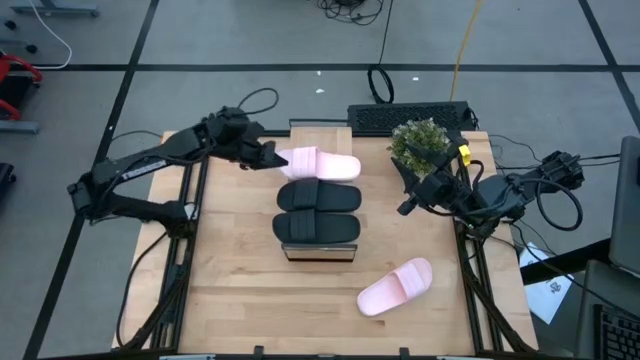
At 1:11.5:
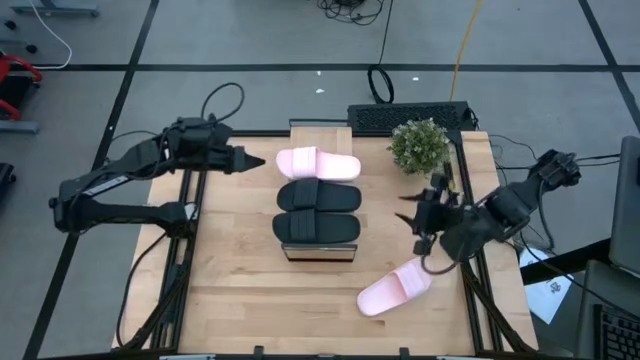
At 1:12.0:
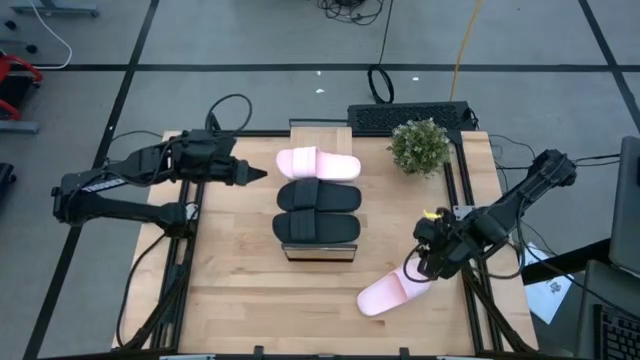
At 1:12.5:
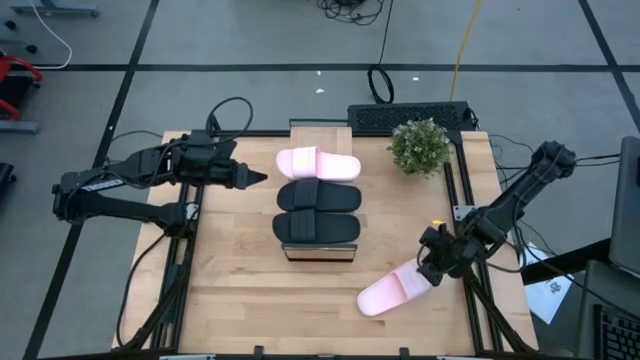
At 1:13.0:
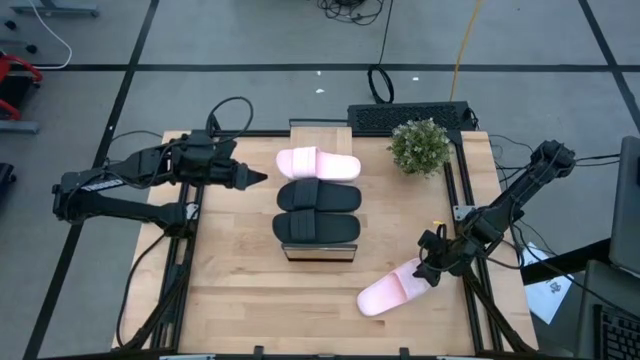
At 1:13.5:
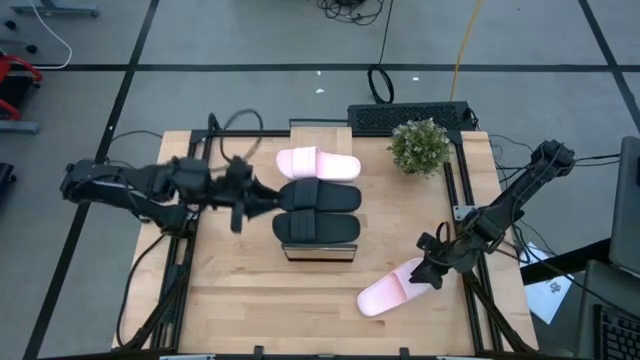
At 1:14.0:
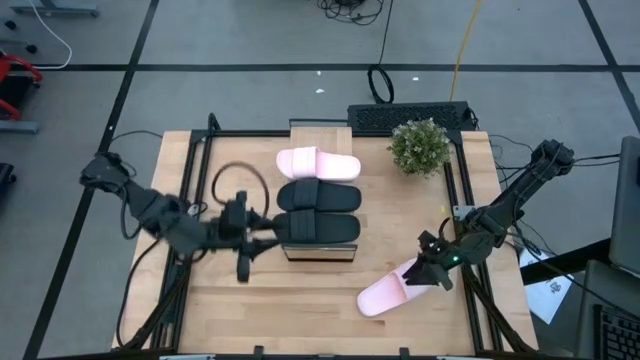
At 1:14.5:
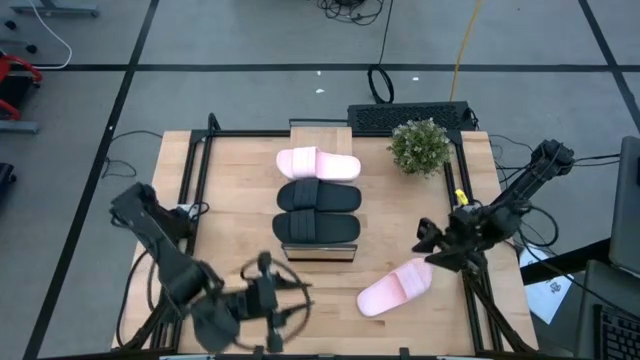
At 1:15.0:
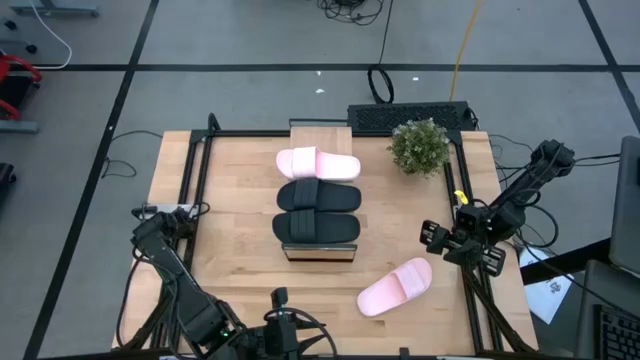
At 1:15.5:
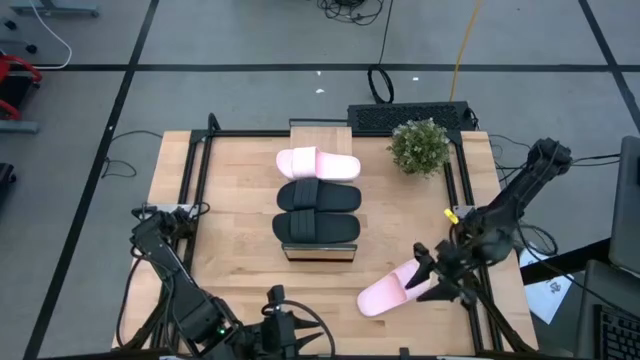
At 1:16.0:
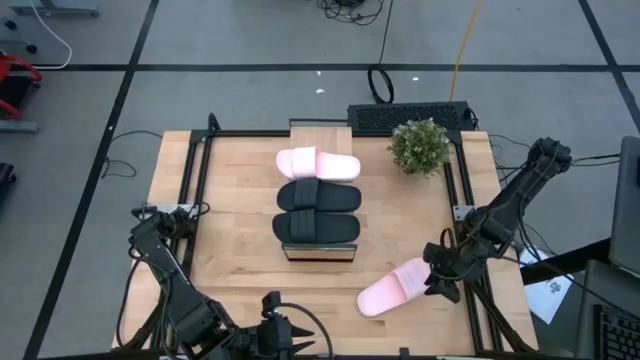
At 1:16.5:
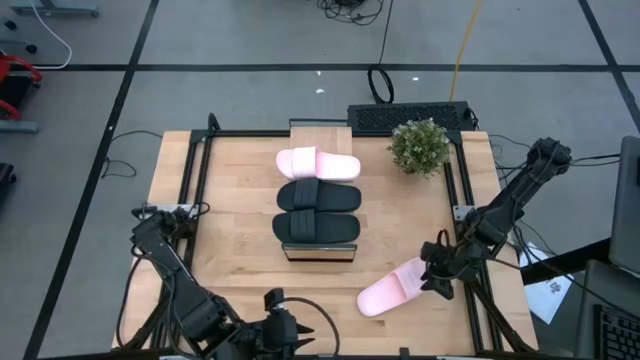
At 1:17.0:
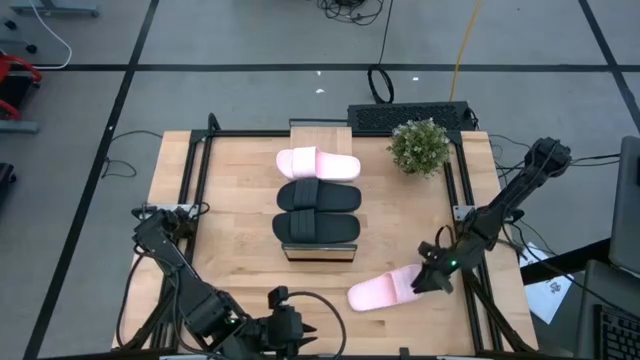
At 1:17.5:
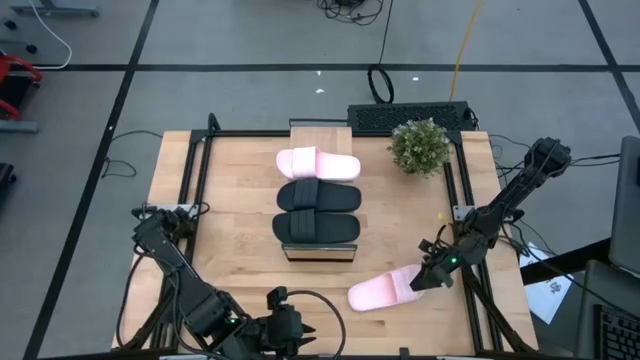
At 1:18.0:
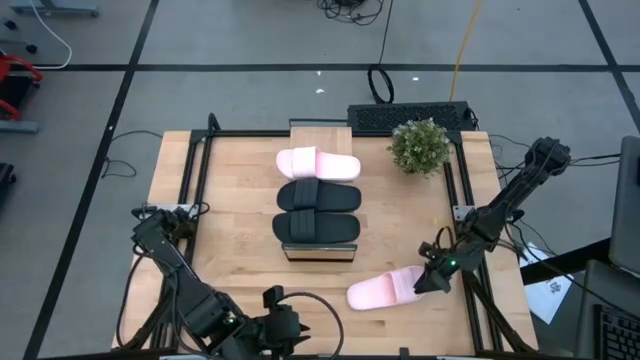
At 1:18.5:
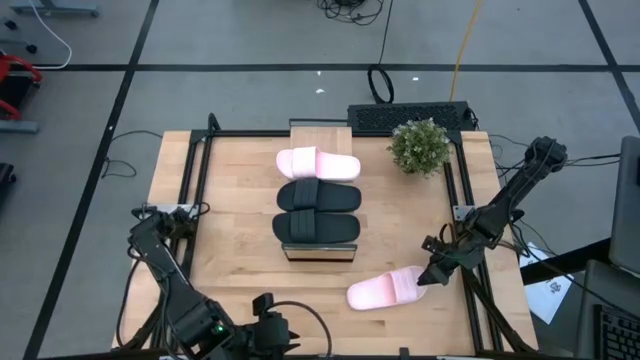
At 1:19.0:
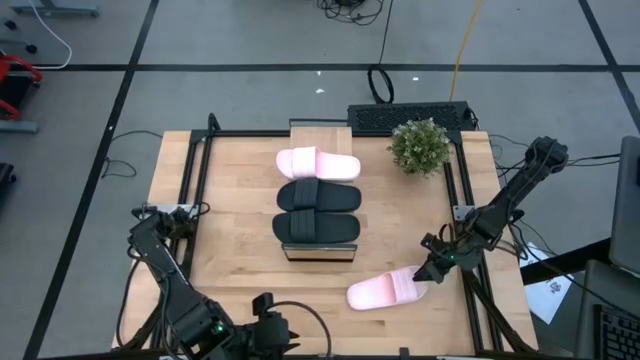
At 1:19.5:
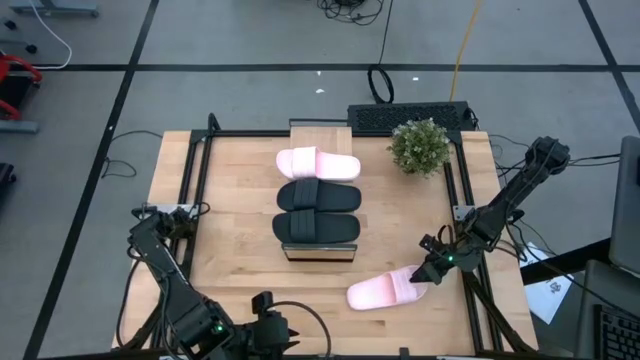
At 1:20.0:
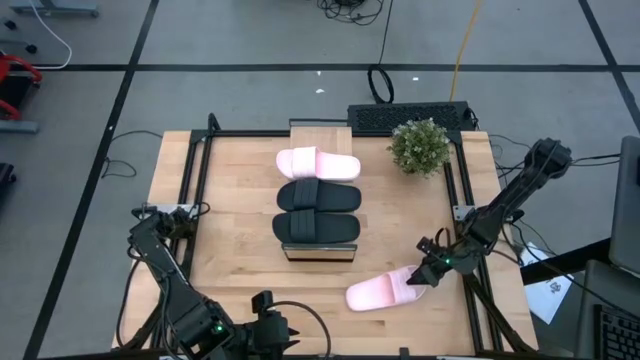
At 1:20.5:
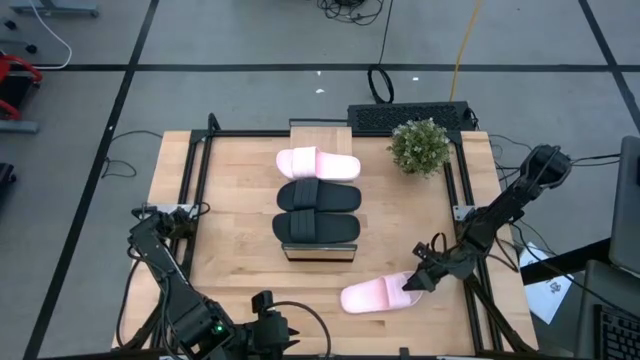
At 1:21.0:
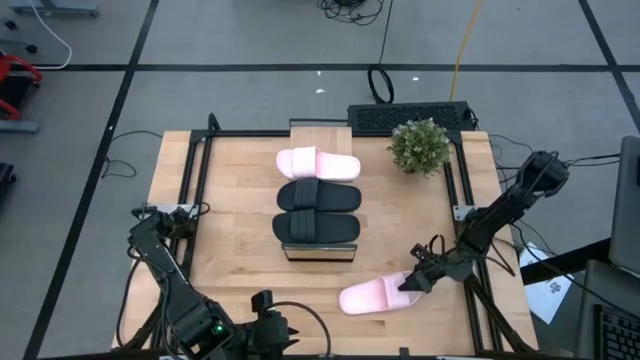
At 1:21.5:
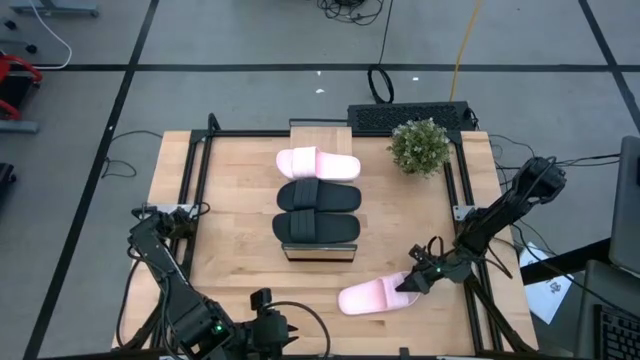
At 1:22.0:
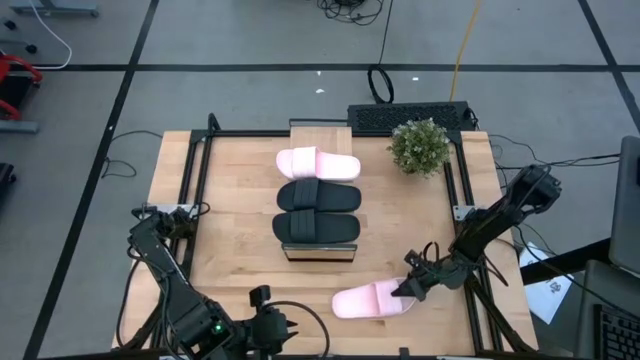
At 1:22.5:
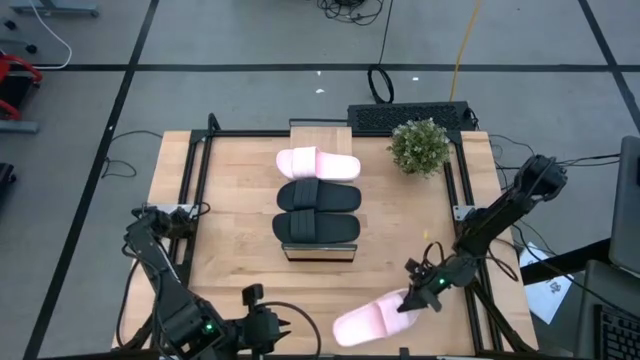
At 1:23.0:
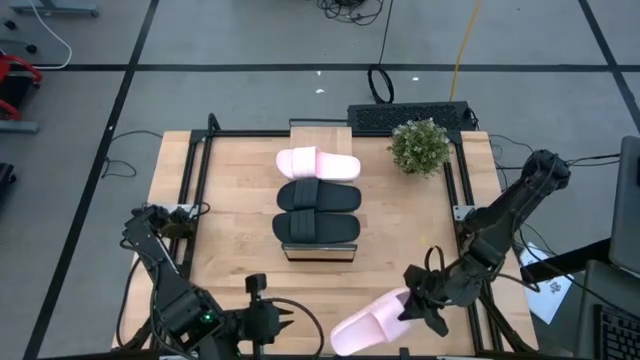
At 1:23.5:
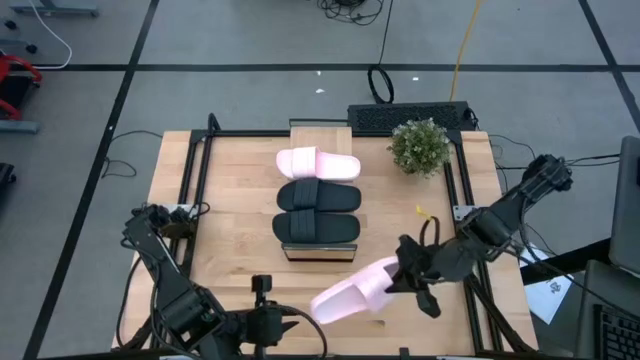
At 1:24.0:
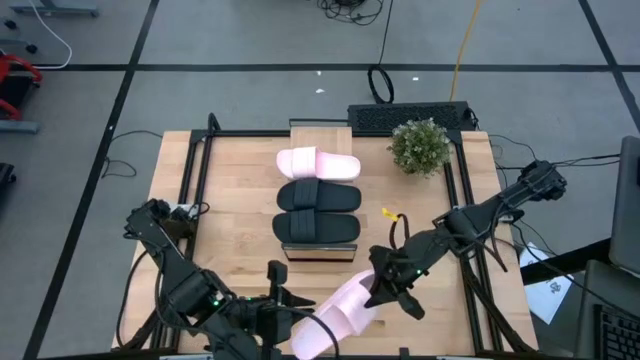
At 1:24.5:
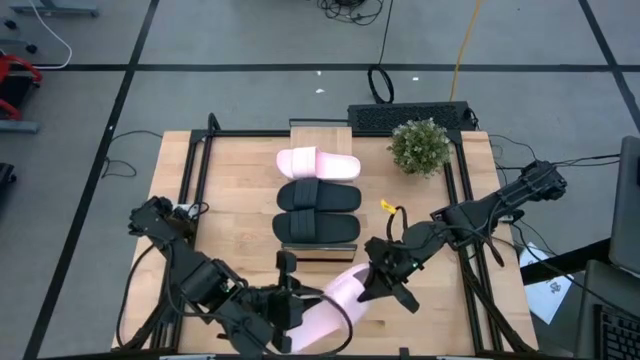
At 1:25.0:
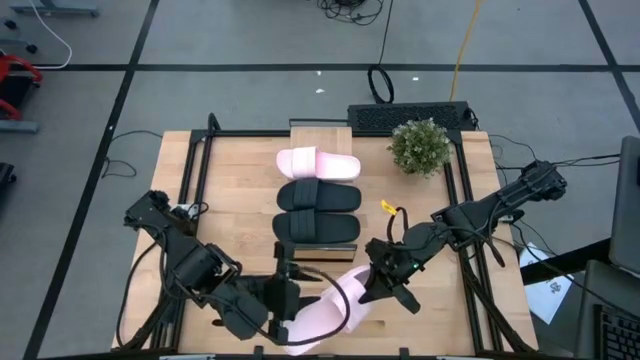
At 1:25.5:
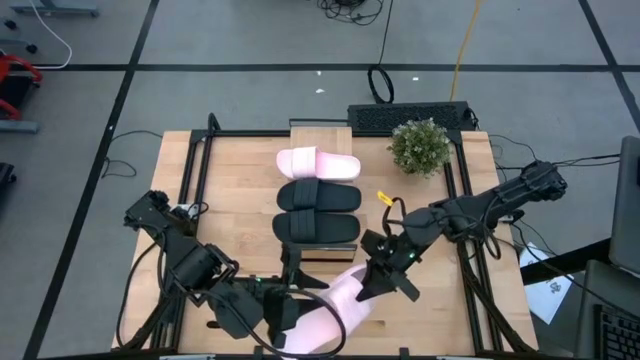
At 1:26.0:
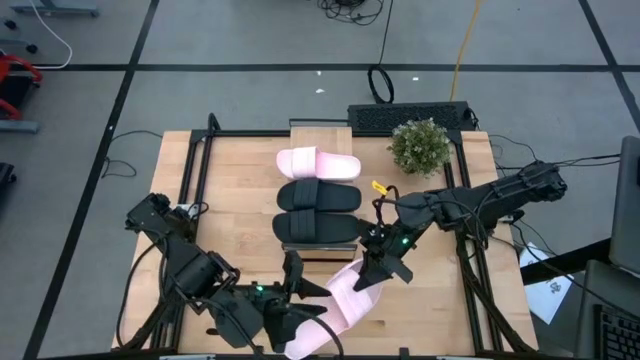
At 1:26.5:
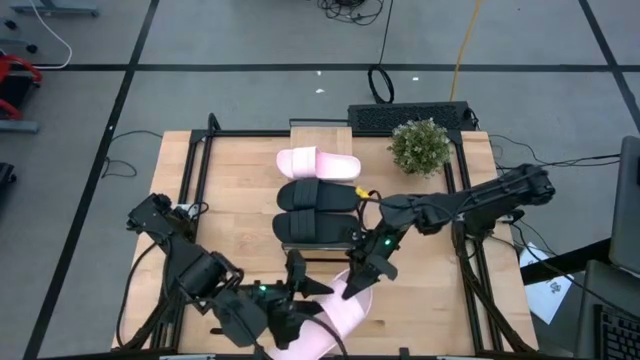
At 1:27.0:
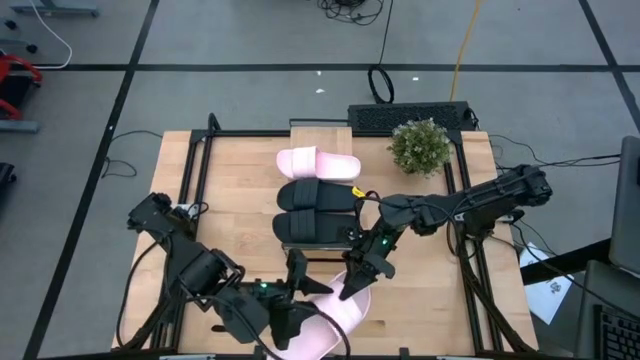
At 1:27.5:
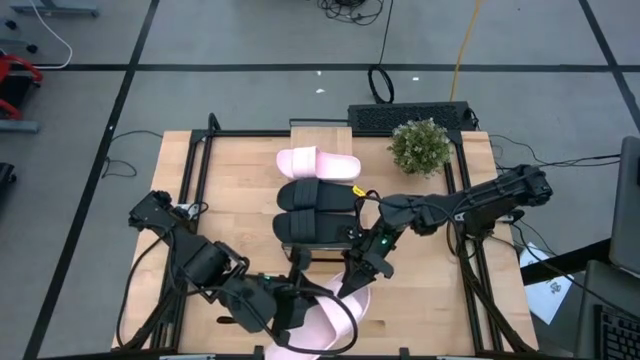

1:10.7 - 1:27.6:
Task: Pick and place slides into the shelf
Put the pink slide on the shelf

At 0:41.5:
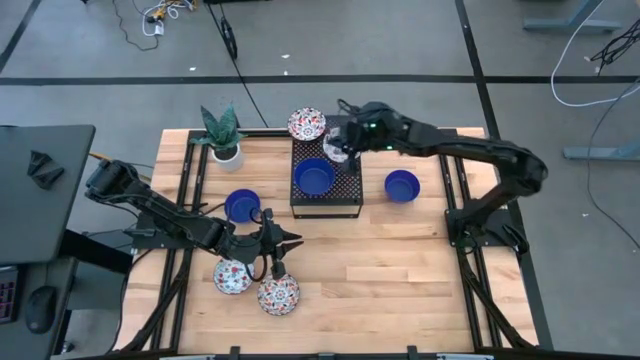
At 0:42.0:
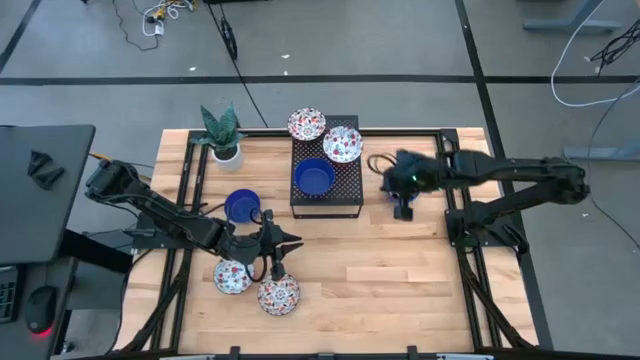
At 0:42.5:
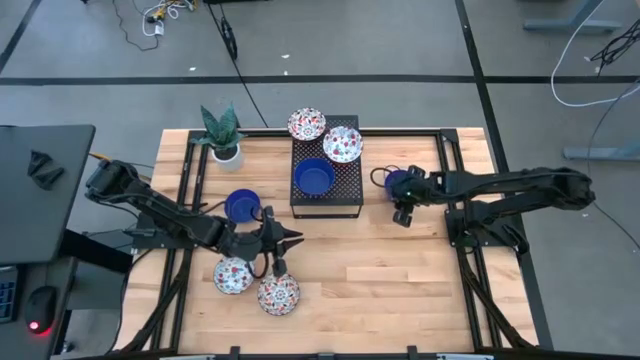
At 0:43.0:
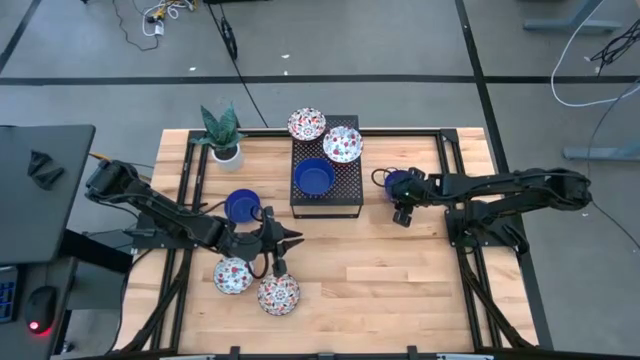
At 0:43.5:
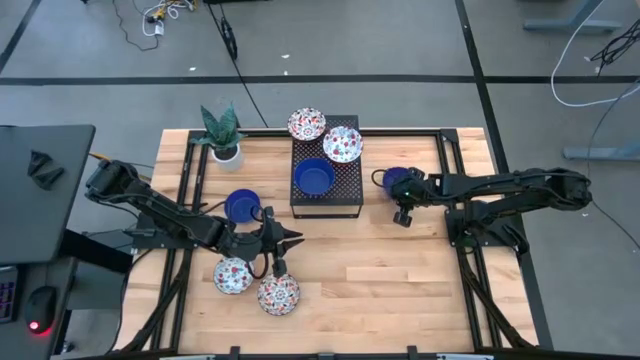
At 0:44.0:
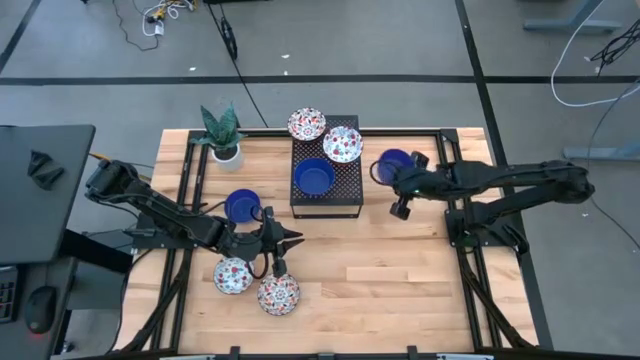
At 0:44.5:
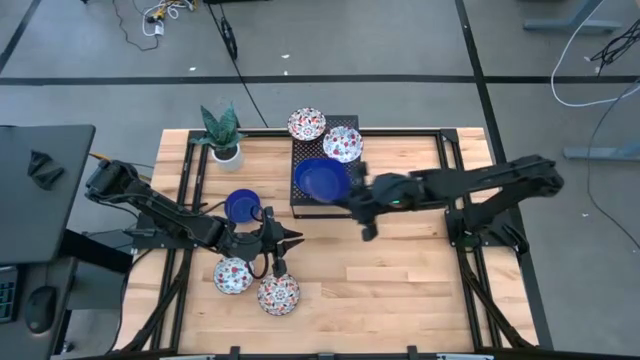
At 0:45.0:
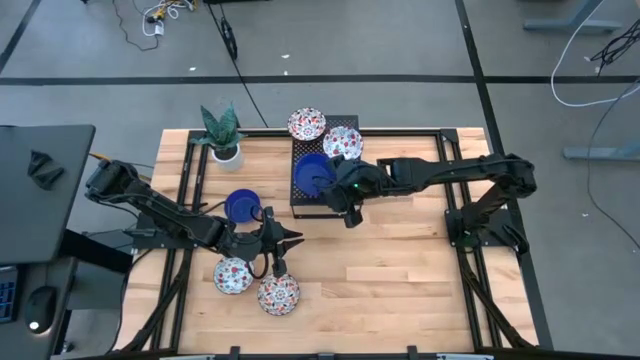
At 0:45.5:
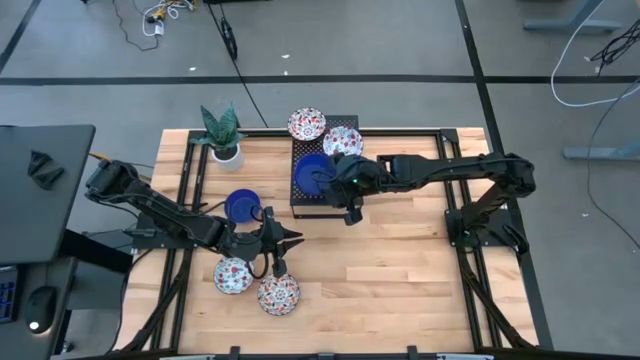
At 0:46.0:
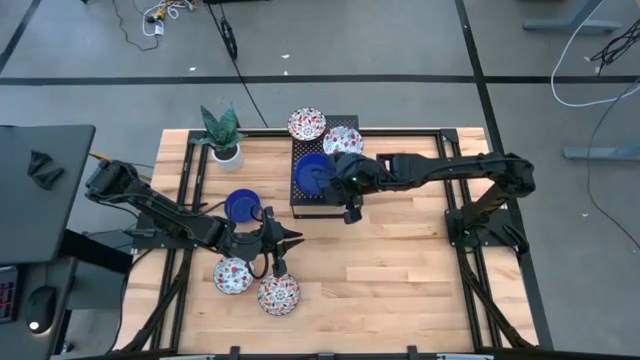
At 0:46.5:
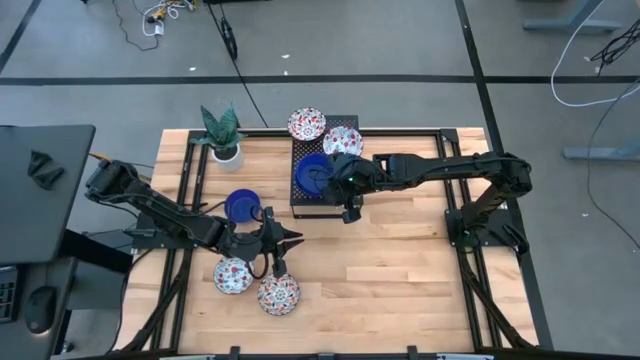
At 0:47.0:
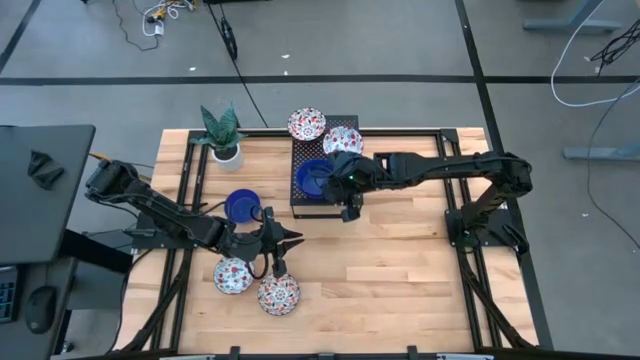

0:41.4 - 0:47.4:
Task: Pick & Place Mini bowls
Stack the right blue bowl on top of the other blue bowl on the shelf
